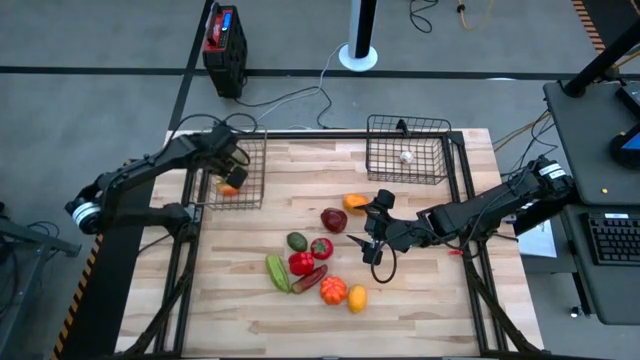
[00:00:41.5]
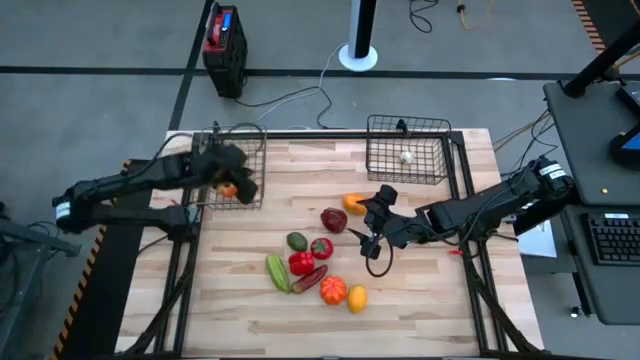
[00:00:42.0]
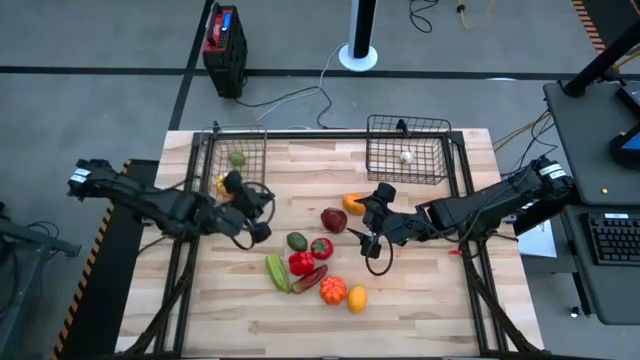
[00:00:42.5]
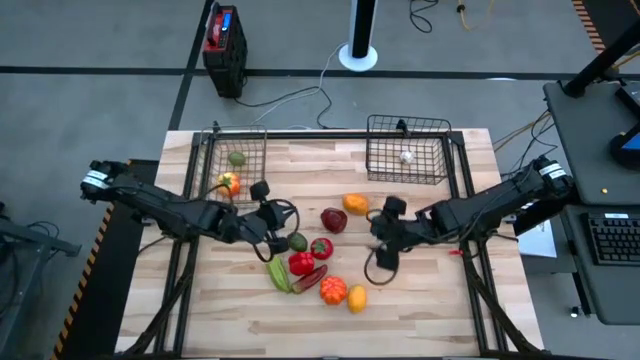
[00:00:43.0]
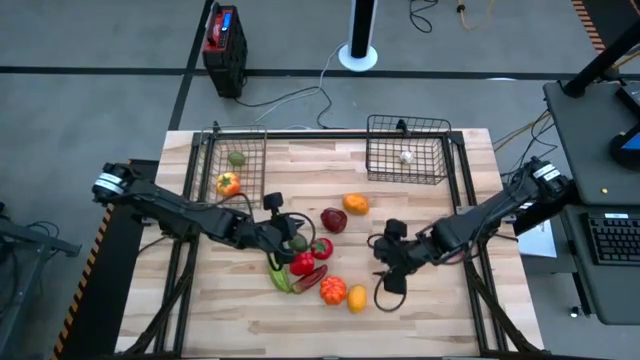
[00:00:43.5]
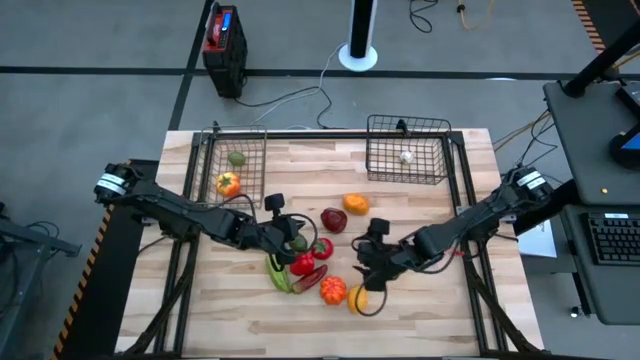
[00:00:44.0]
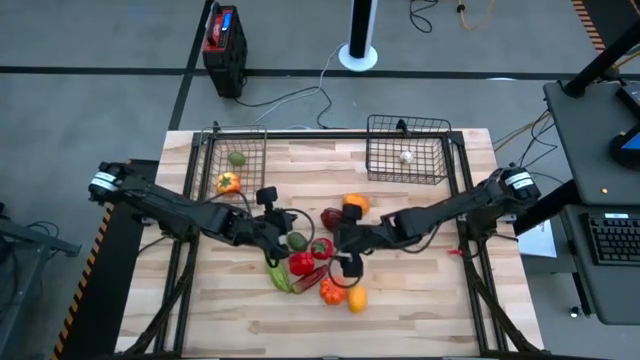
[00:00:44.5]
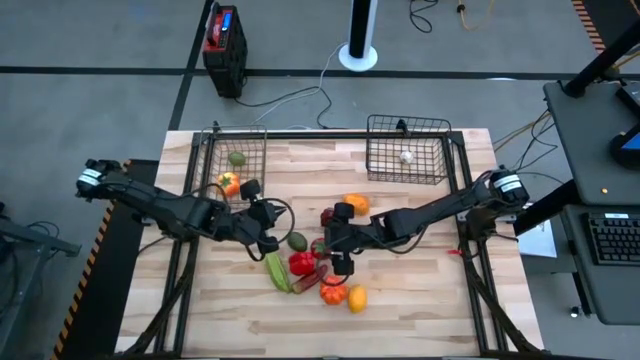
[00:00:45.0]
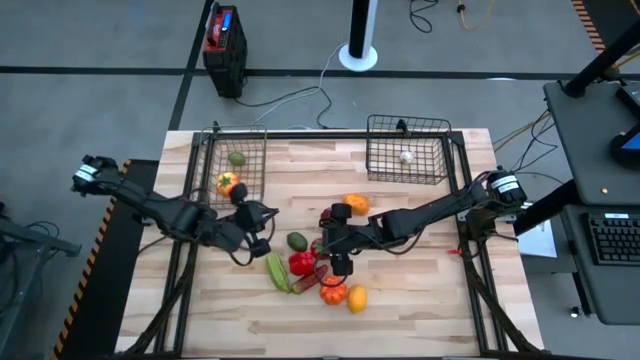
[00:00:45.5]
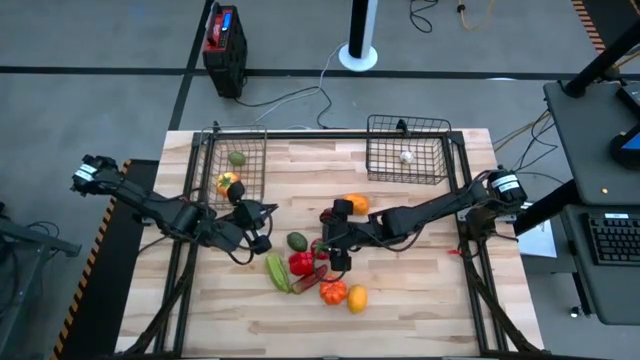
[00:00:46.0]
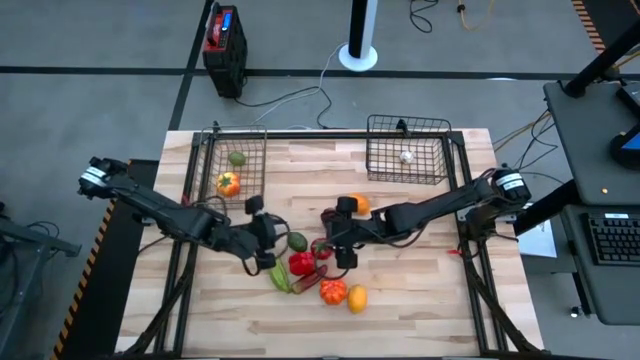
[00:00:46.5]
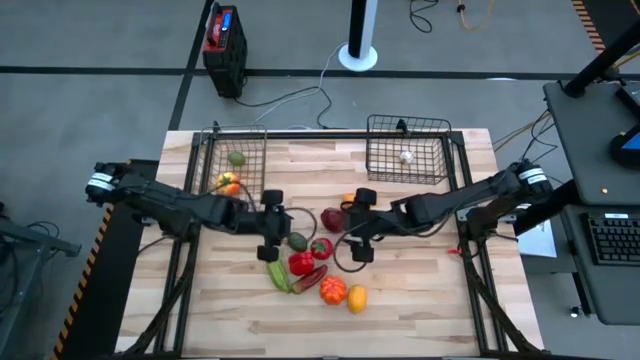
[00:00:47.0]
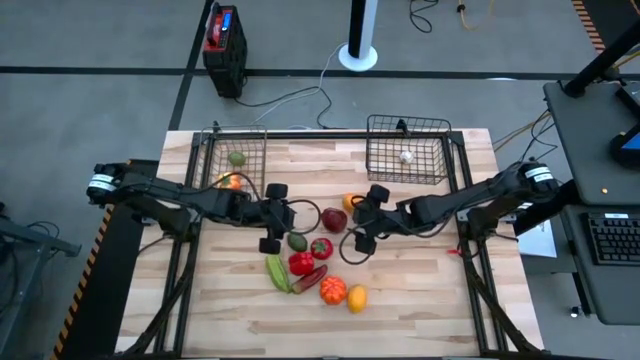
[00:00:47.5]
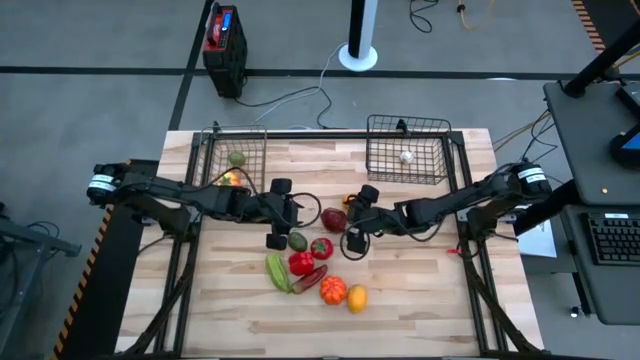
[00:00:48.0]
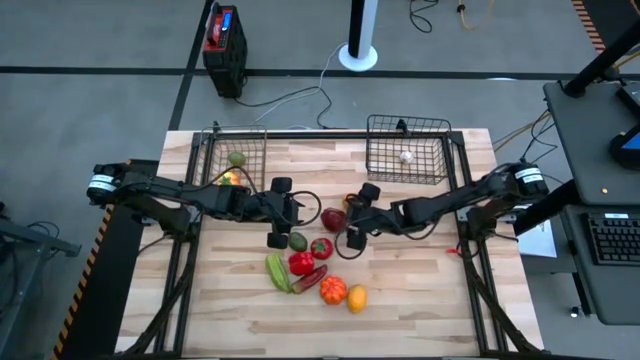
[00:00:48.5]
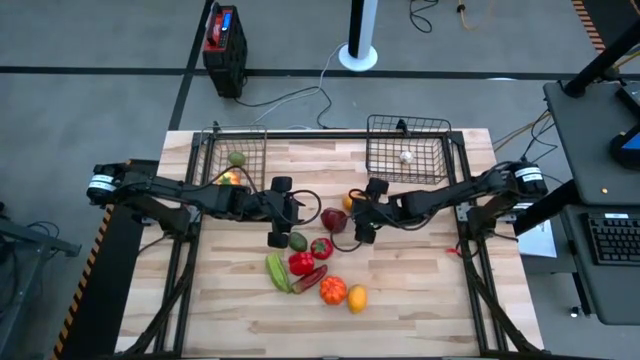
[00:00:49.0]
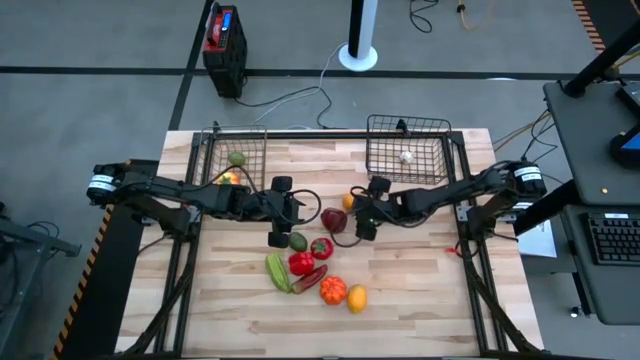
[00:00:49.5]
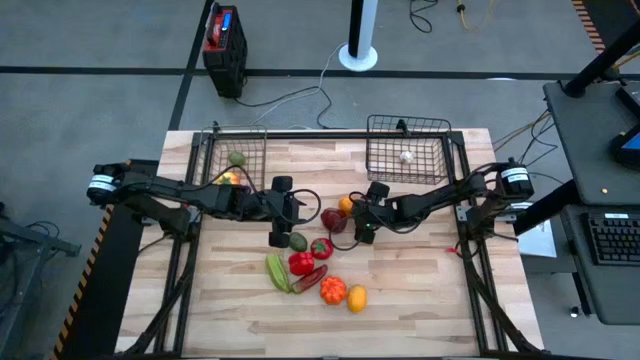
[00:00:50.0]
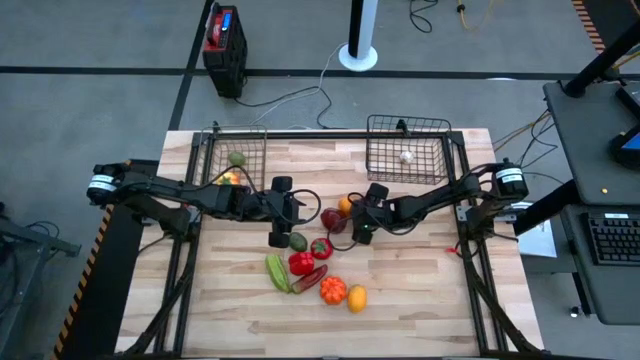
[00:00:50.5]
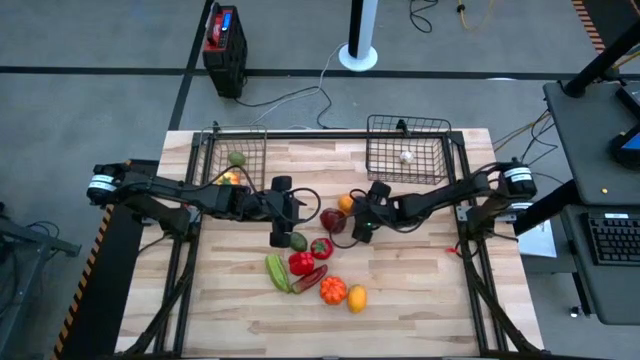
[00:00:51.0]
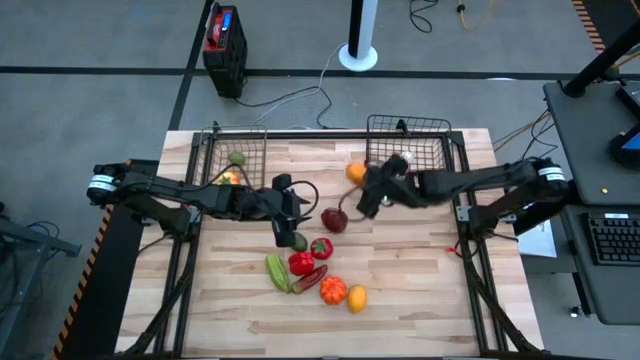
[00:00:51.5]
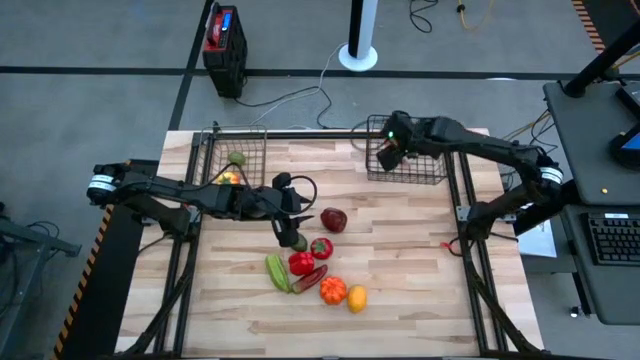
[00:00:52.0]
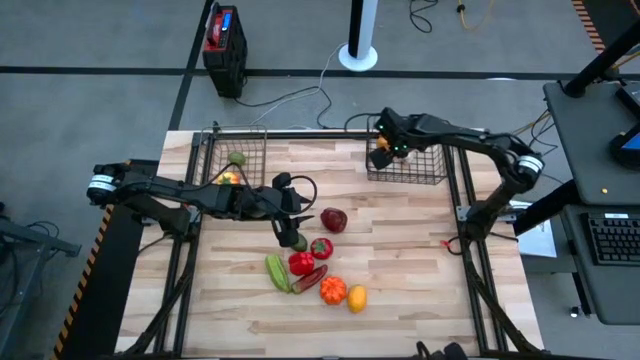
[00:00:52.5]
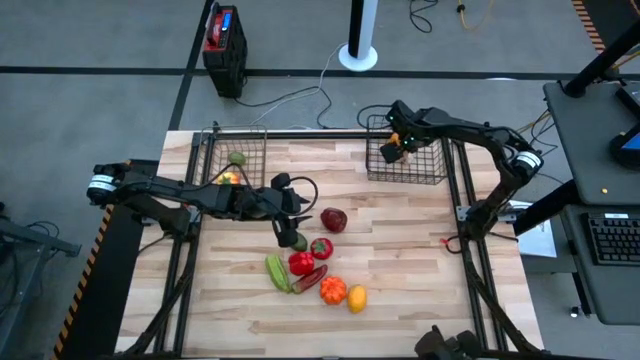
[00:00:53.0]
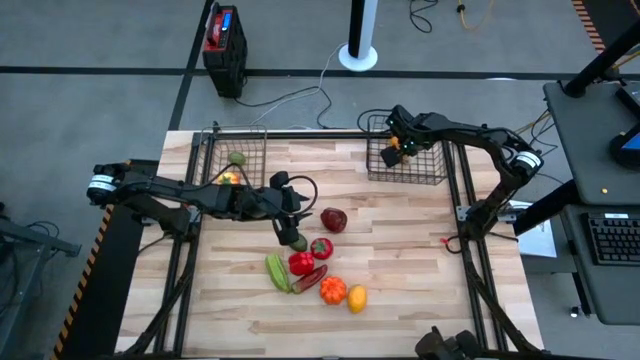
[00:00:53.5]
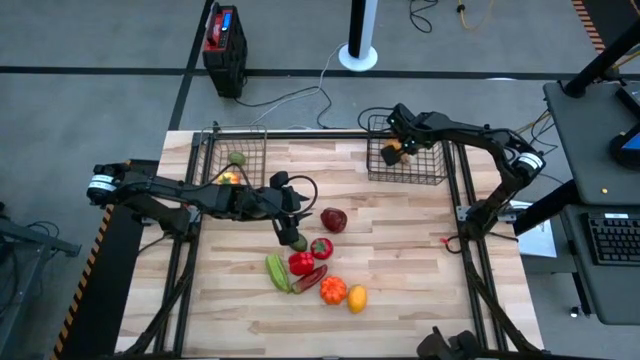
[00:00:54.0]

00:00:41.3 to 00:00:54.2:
Task: Sort produce into baskets
Put the potato into the black wire basket

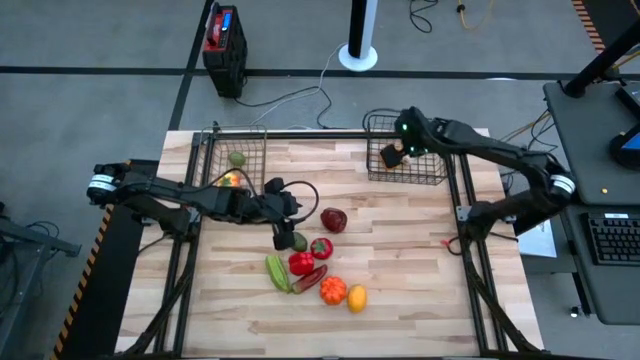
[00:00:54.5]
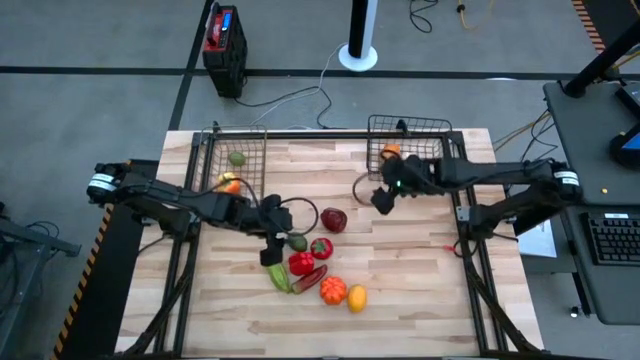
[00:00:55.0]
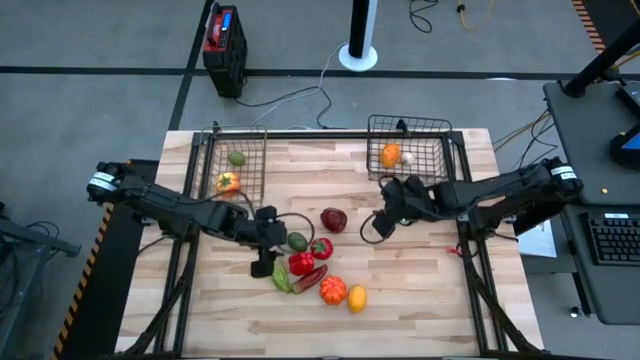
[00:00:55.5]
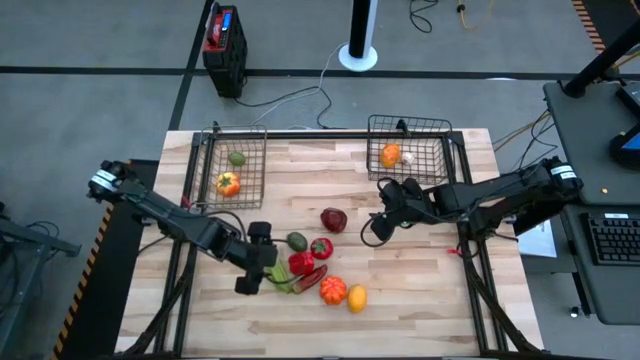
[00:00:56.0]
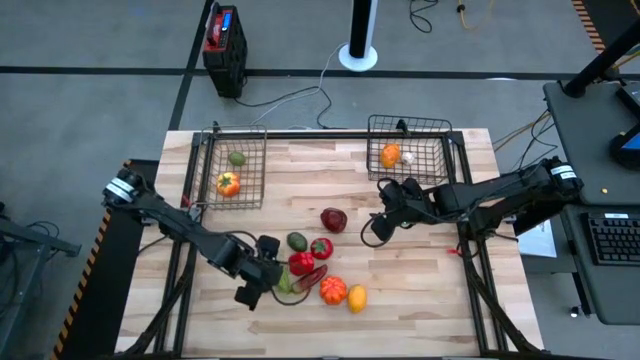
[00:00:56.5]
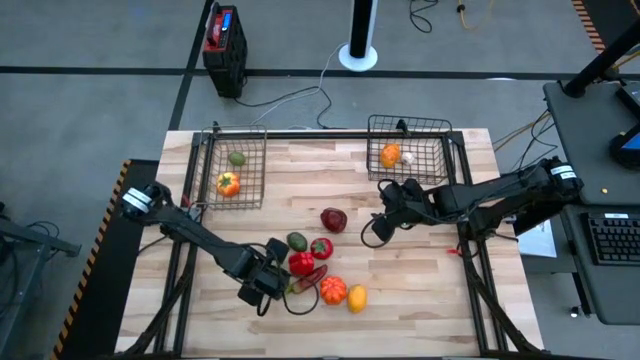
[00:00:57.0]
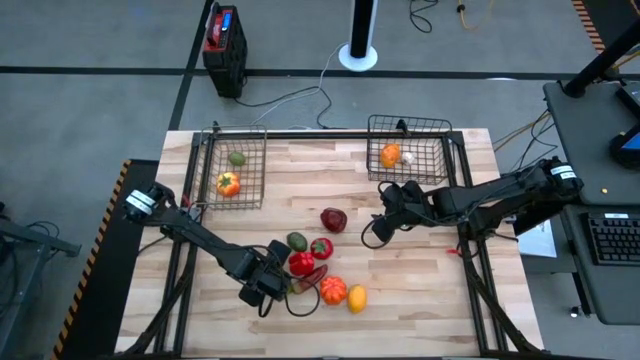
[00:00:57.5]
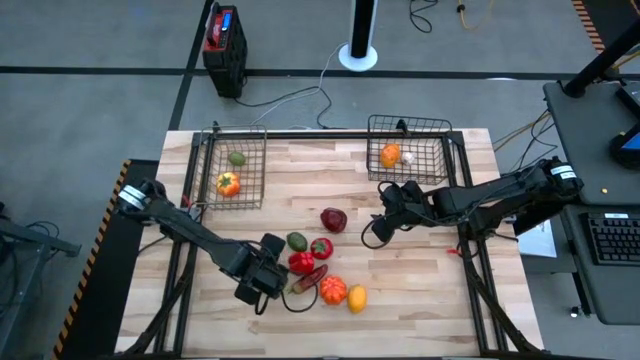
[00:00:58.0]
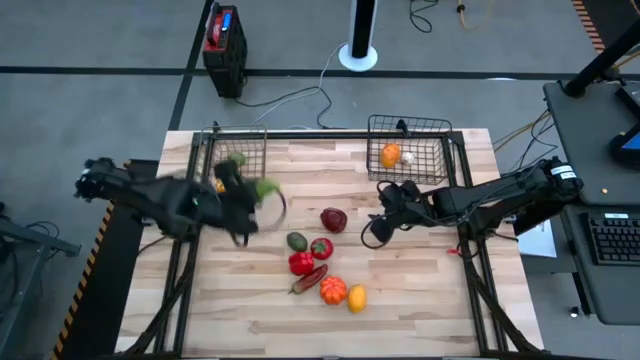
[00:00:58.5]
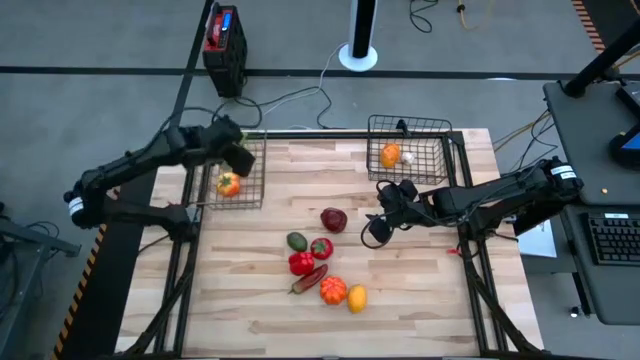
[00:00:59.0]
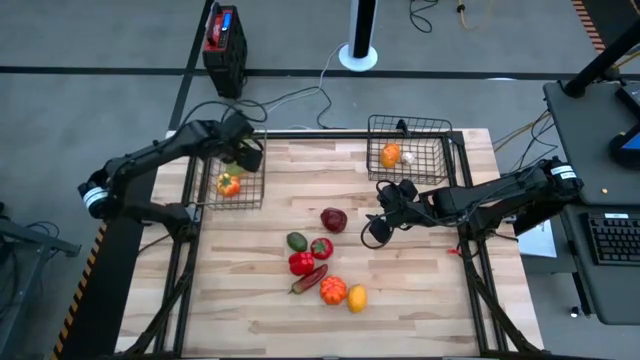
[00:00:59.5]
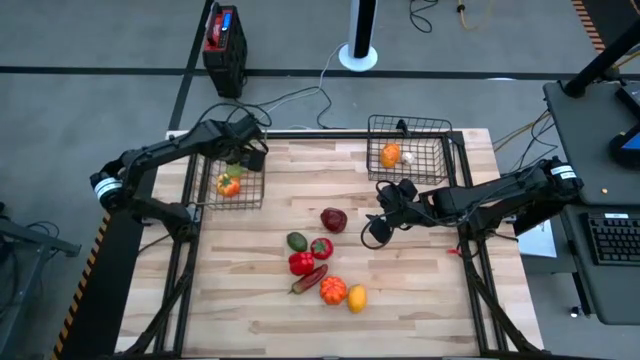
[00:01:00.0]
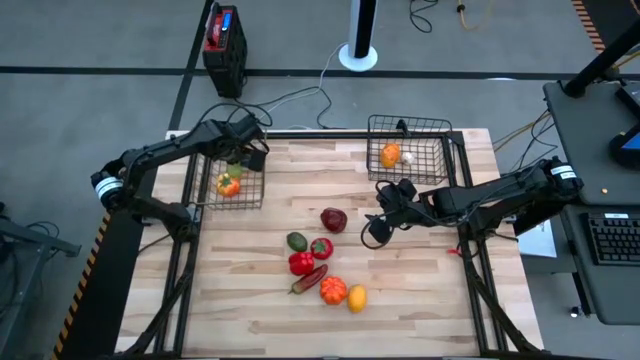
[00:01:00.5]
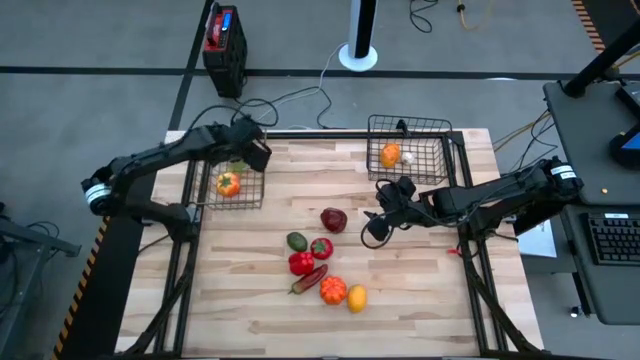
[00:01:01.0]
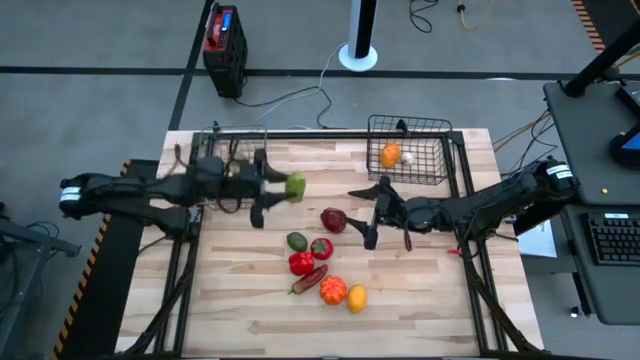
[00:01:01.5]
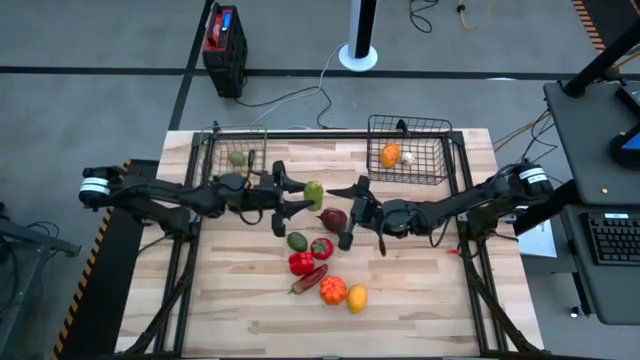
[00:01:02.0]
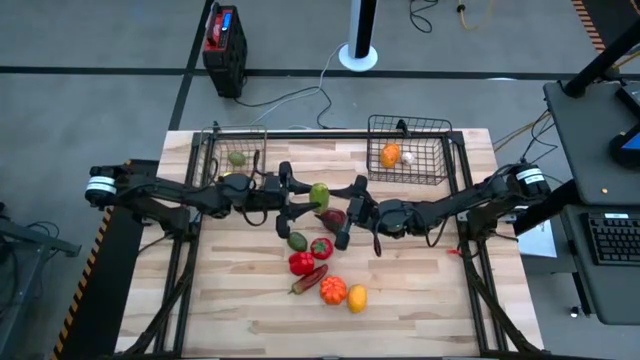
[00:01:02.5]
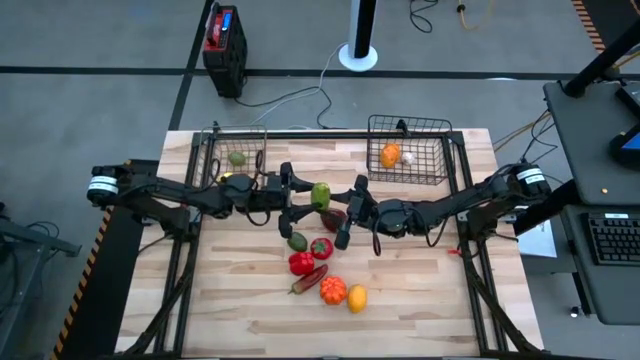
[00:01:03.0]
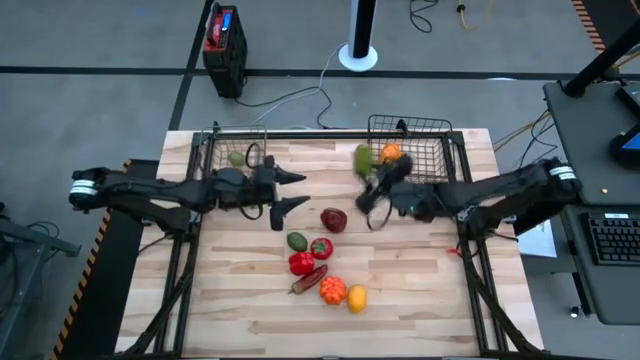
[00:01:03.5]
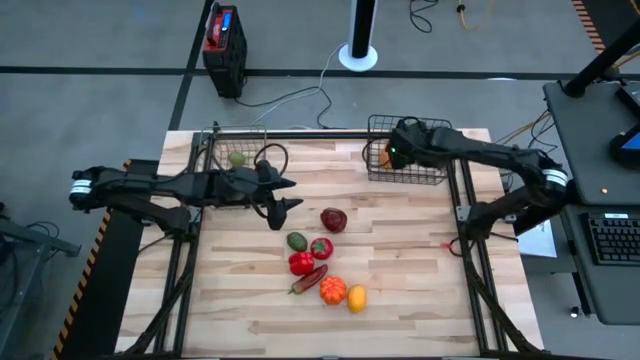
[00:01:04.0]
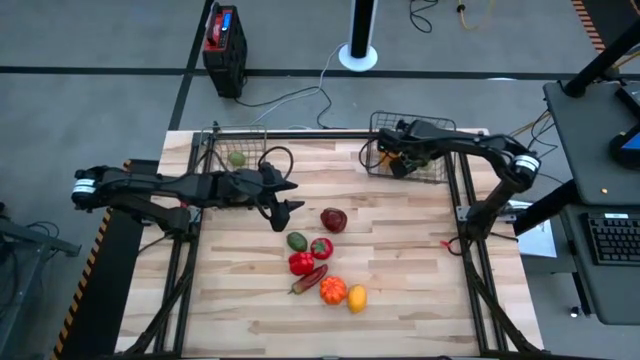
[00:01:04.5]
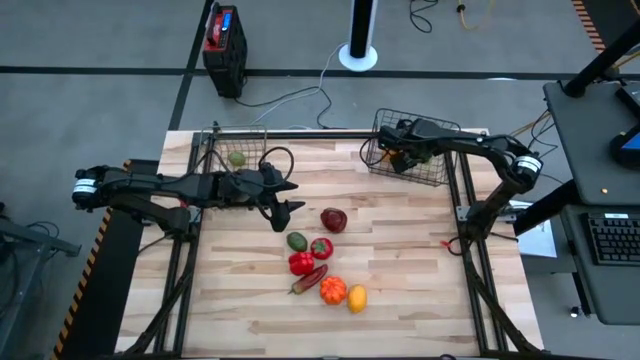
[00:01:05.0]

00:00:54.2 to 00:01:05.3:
Put the cucumber into the black wire basket
